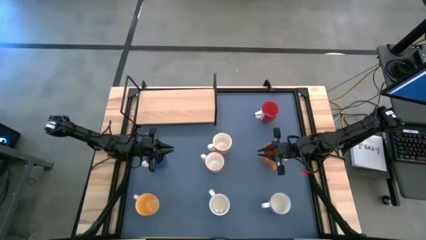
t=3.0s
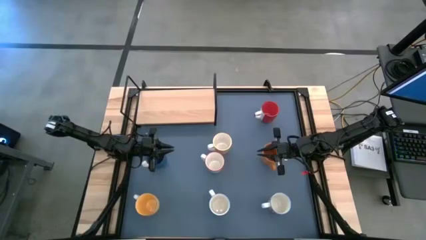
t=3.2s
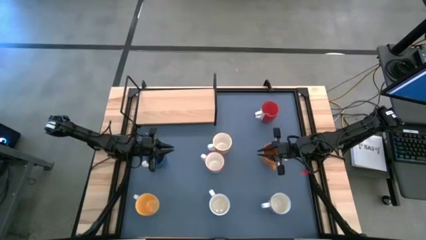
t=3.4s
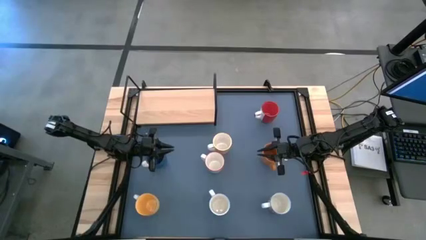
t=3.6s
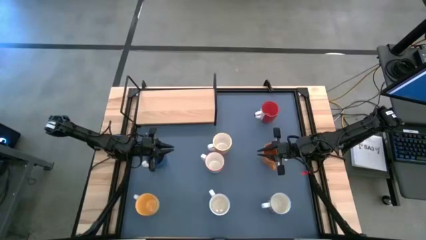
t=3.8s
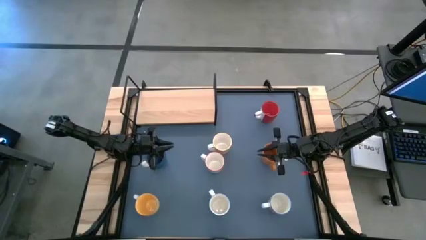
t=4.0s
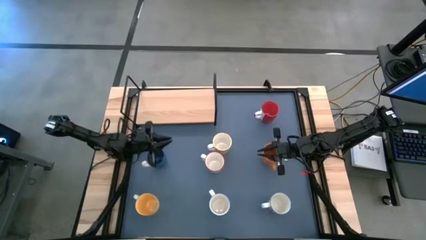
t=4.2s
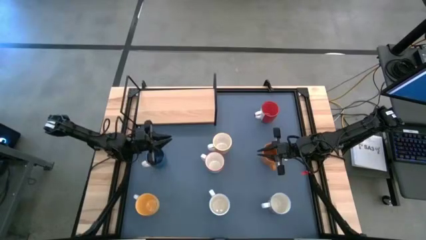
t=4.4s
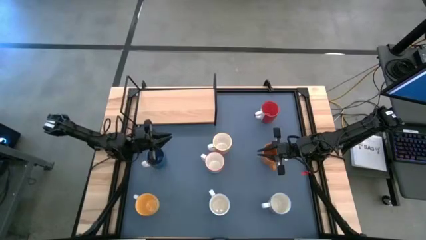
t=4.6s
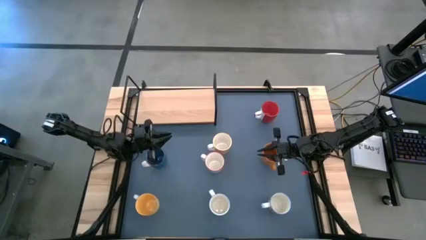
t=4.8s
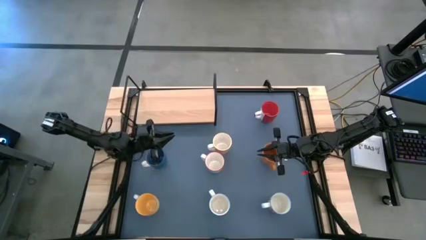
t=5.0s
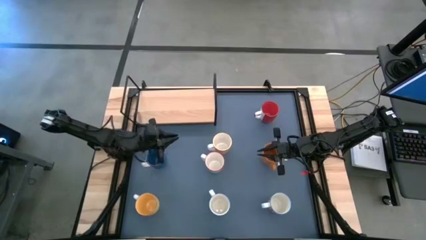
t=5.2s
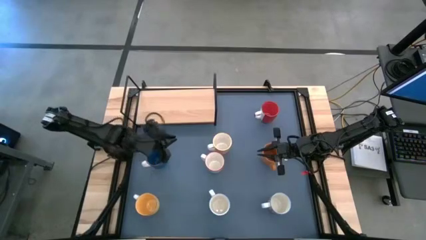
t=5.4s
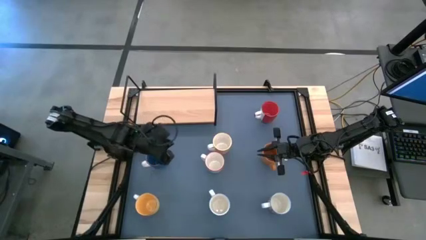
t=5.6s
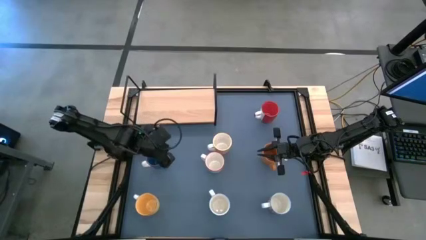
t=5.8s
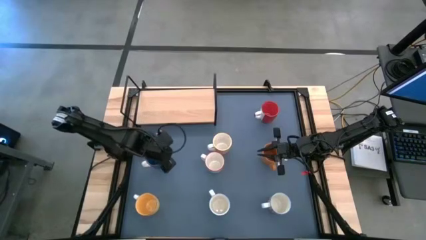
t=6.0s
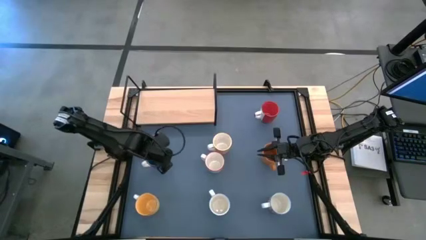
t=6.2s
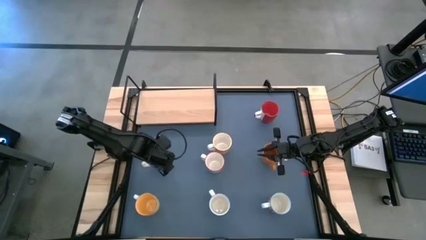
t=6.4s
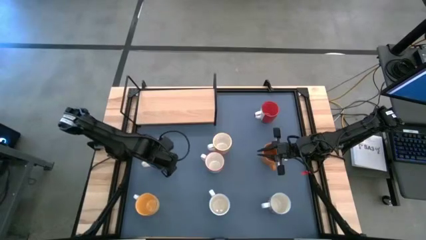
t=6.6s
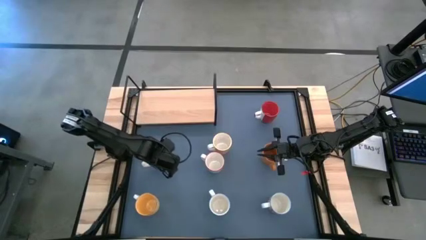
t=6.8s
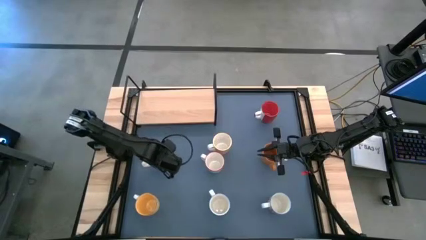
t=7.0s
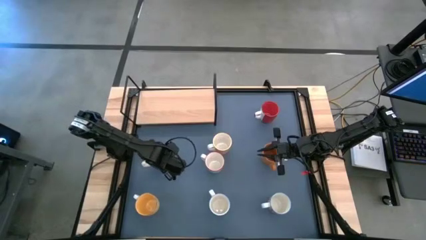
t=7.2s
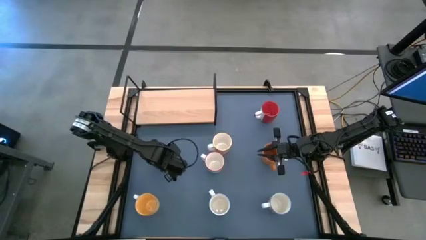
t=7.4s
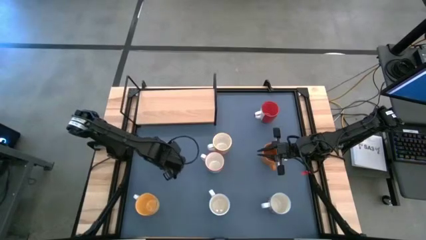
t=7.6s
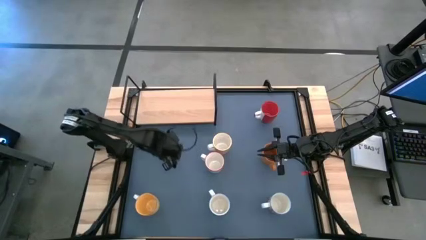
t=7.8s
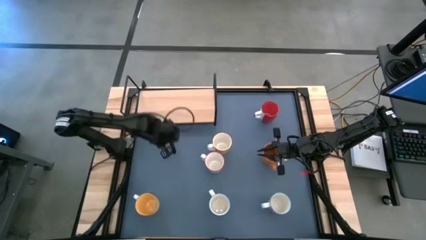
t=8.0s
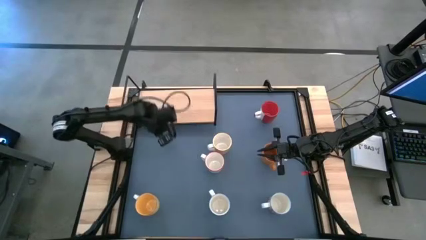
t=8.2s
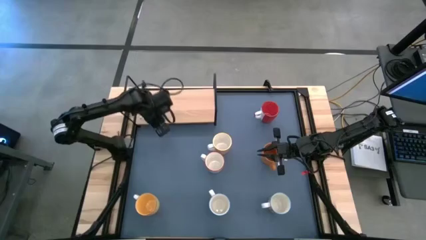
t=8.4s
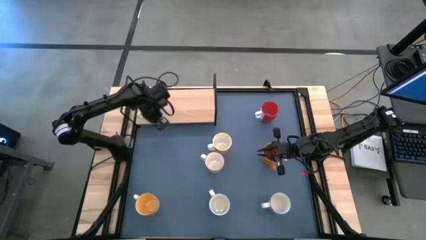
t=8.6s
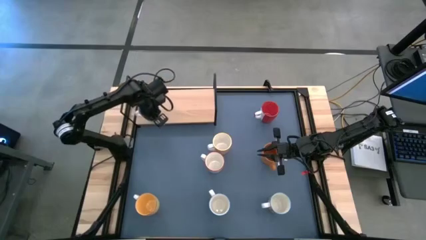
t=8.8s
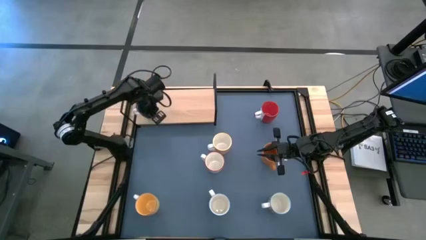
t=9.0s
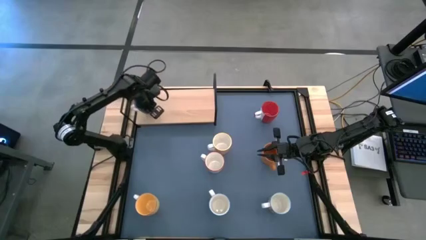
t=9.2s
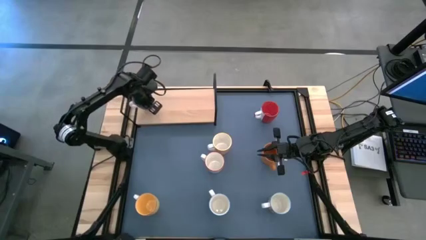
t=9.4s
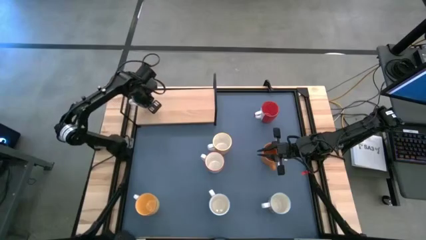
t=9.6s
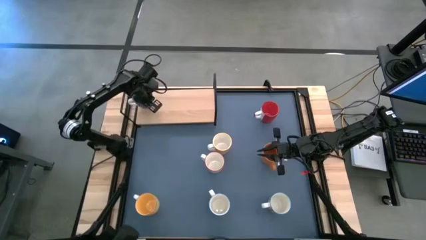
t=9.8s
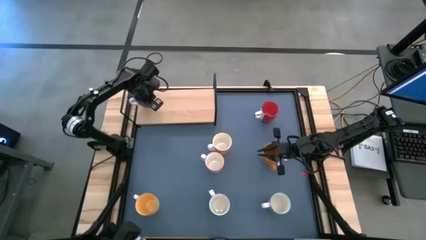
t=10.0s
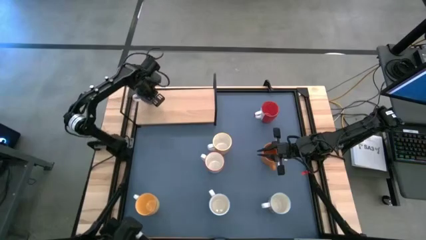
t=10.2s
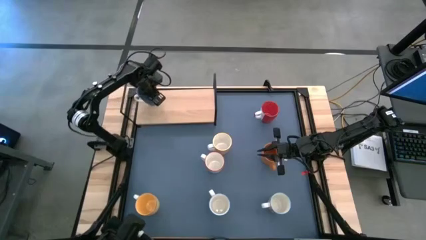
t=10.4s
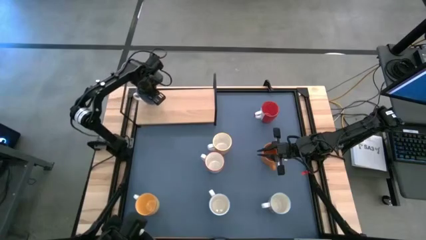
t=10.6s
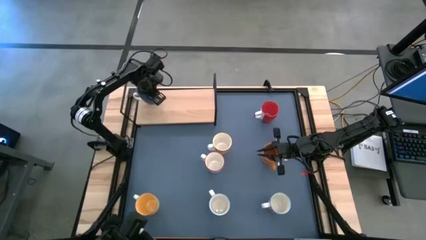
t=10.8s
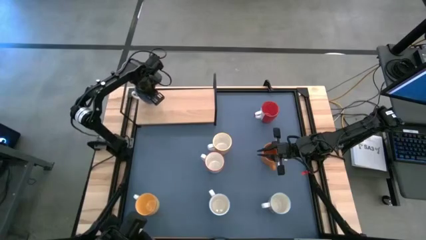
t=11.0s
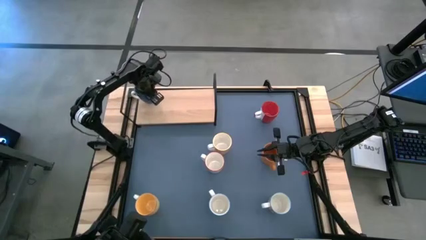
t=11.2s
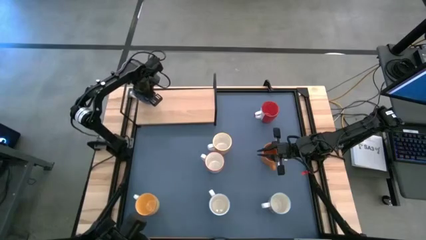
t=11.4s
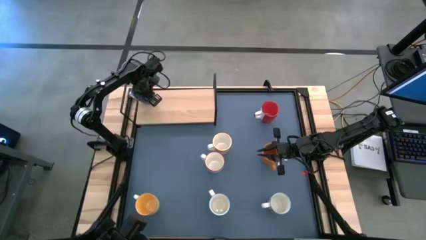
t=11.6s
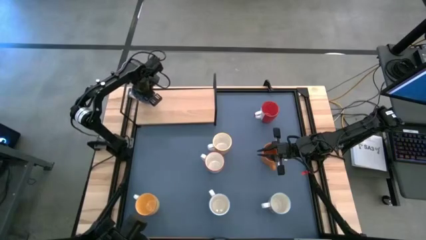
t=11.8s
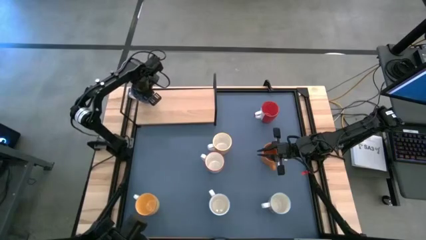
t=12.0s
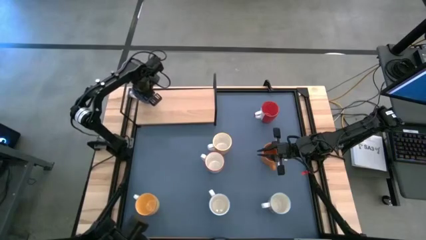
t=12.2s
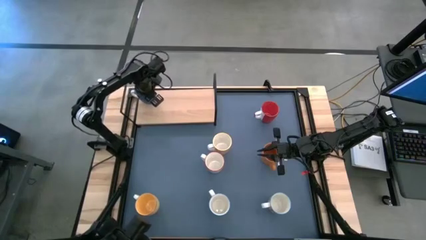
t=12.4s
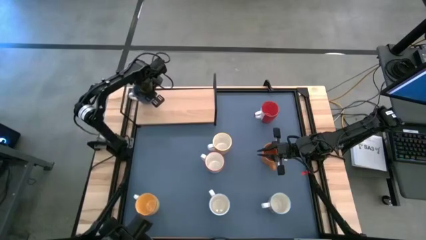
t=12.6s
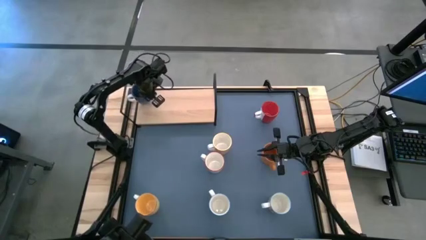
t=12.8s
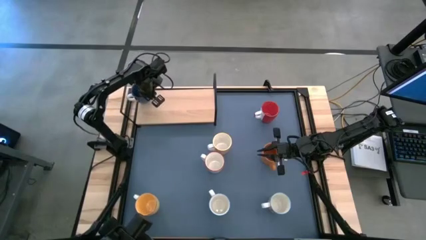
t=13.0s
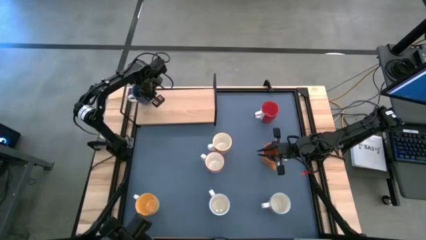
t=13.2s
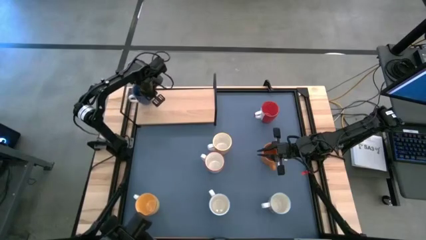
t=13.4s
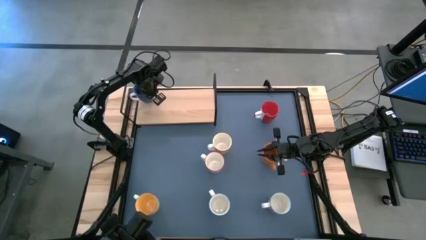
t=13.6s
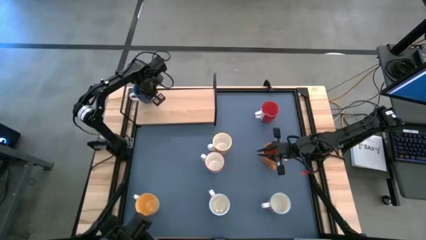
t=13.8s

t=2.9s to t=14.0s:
Task: Place coffee mugs
Put the blue mug on the shelf

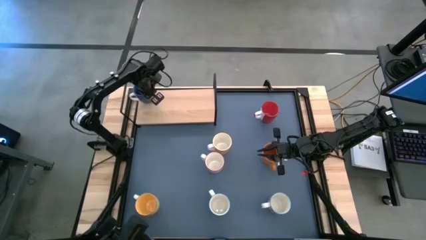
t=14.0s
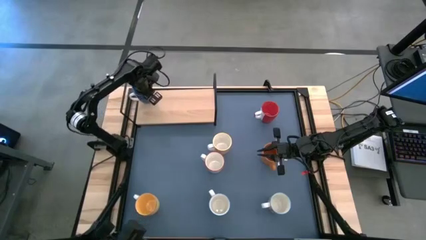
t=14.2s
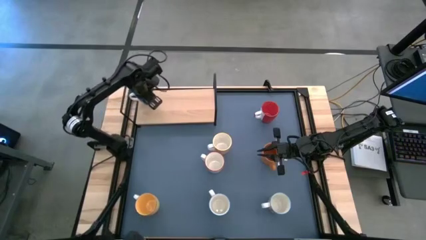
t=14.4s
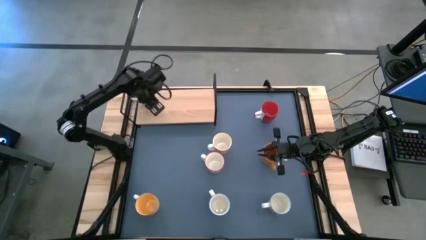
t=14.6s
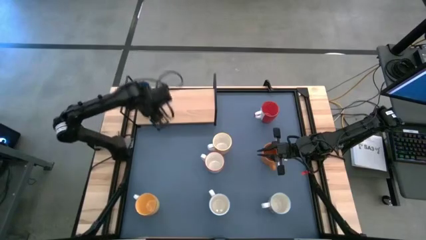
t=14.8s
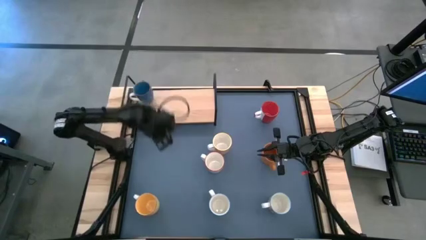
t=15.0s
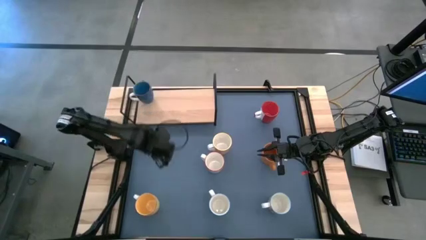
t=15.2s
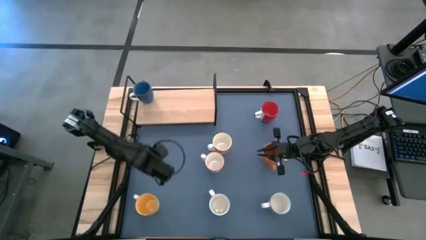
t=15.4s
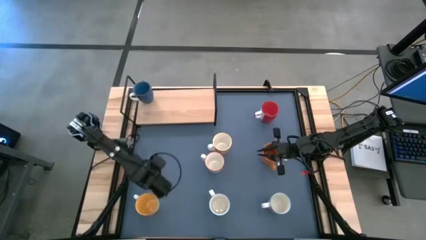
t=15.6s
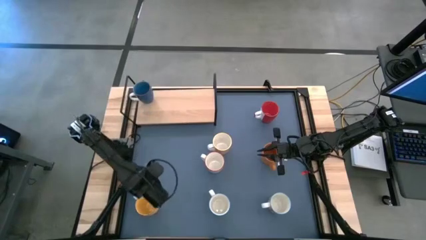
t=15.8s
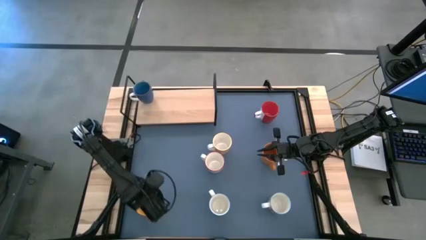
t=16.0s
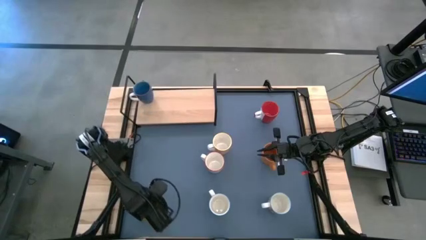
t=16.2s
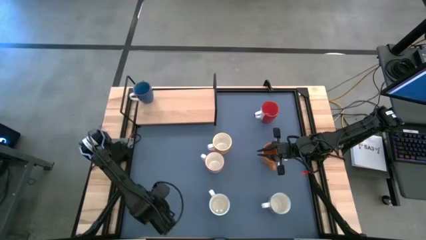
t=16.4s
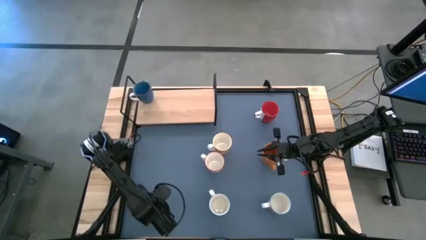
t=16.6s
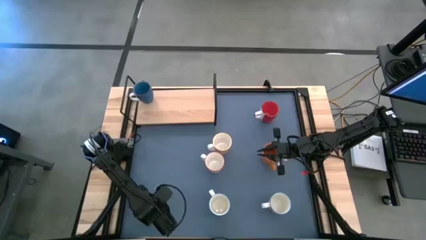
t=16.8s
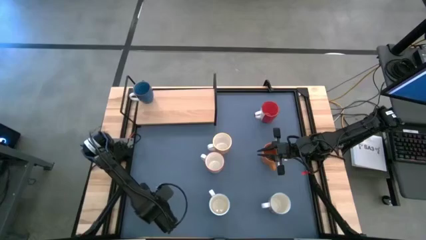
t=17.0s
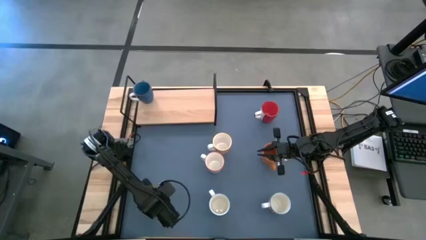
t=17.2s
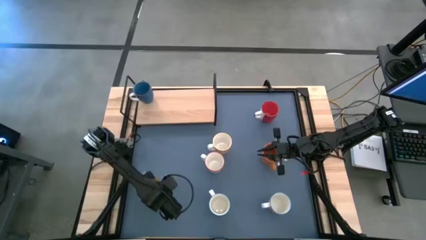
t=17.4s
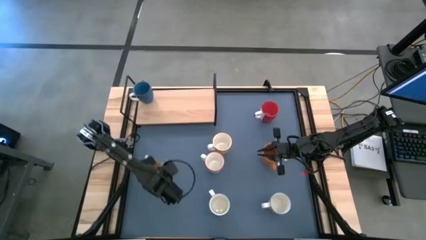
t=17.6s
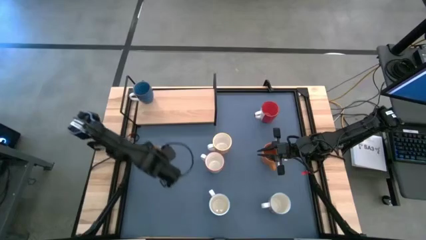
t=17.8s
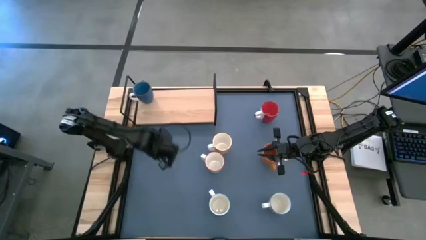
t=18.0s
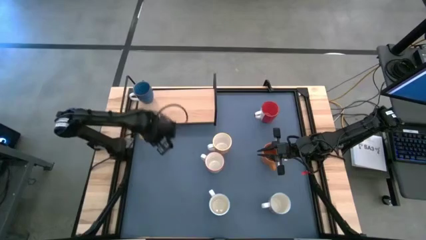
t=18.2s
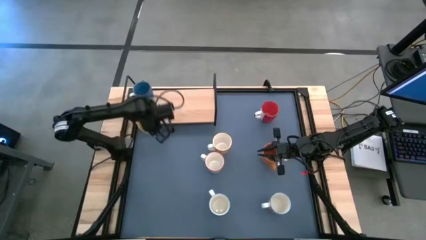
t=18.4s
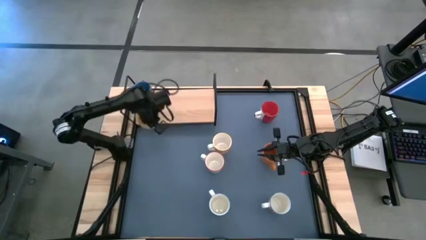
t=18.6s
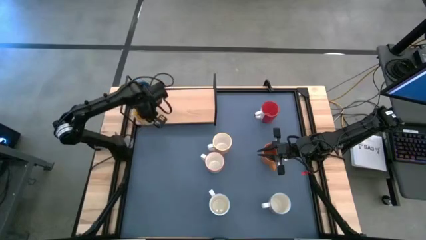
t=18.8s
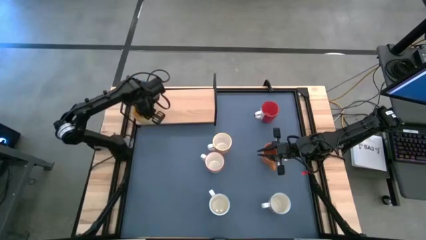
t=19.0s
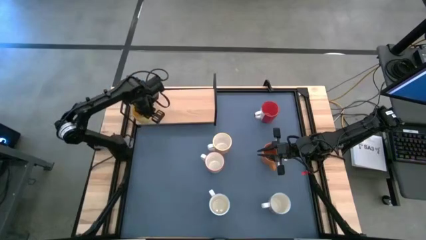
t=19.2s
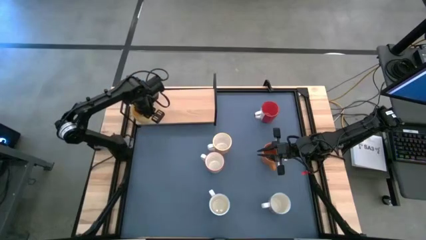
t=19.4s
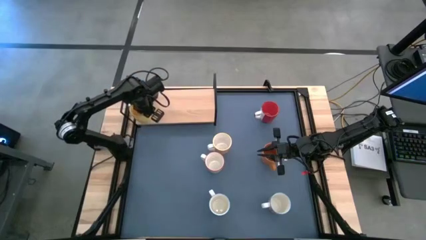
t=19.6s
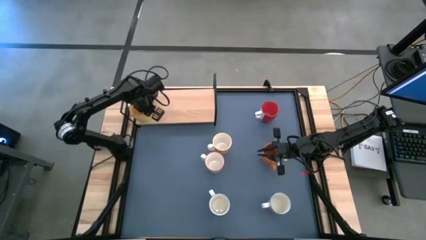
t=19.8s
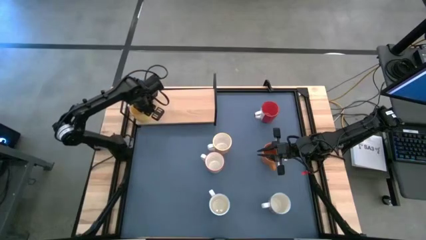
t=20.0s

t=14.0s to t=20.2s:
Put the yellow mug on the shelf
